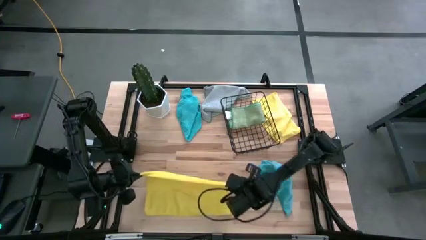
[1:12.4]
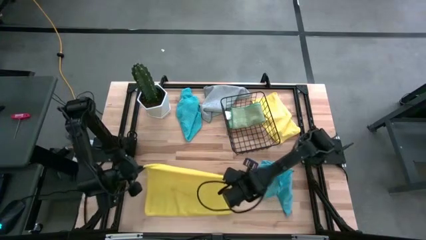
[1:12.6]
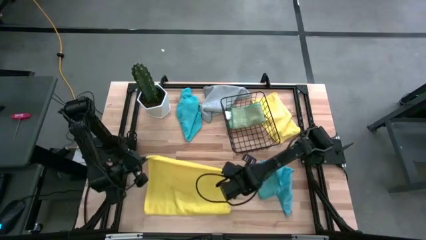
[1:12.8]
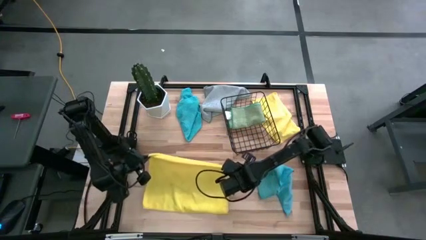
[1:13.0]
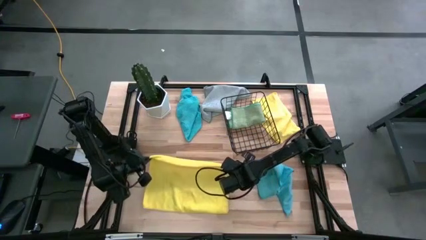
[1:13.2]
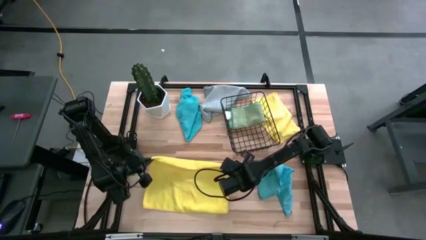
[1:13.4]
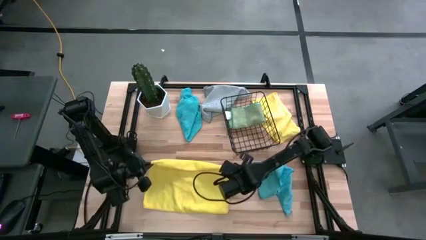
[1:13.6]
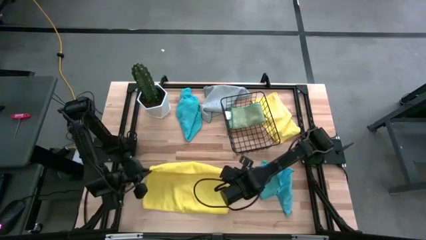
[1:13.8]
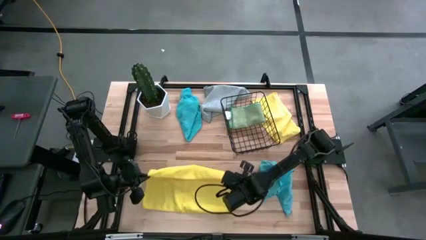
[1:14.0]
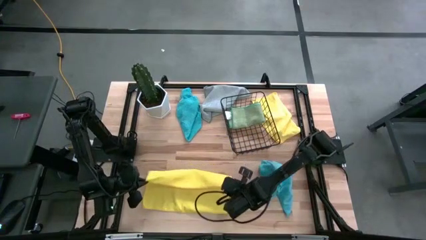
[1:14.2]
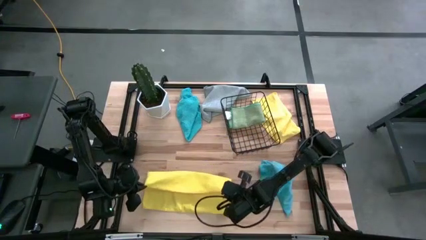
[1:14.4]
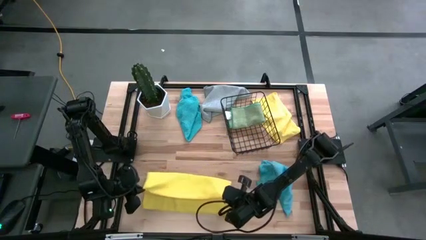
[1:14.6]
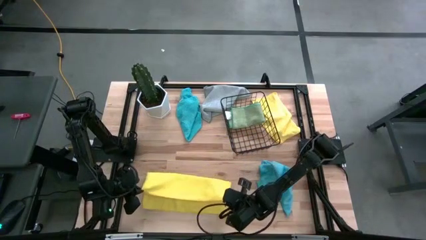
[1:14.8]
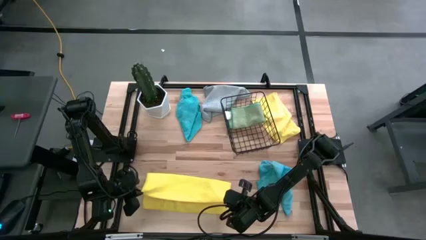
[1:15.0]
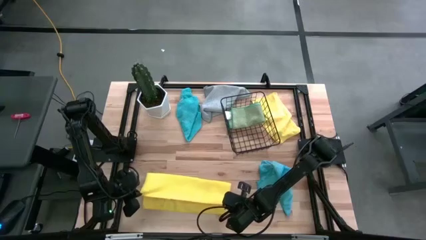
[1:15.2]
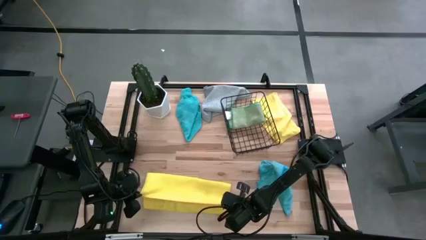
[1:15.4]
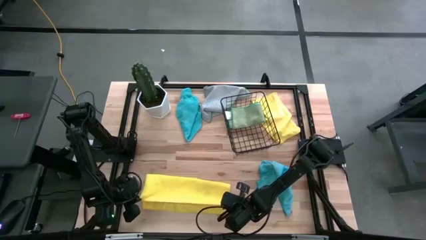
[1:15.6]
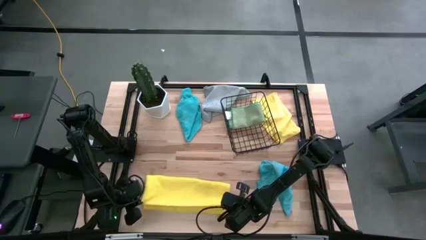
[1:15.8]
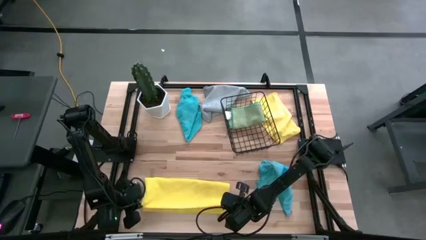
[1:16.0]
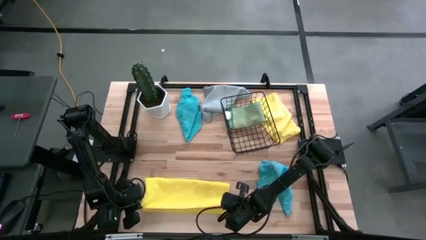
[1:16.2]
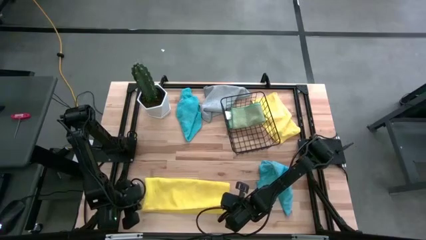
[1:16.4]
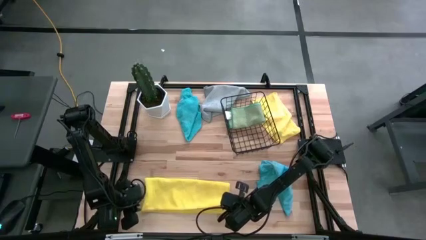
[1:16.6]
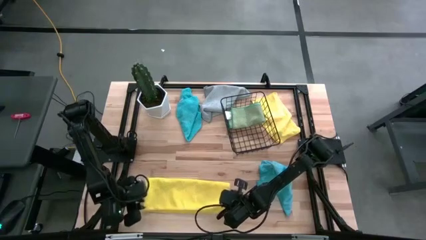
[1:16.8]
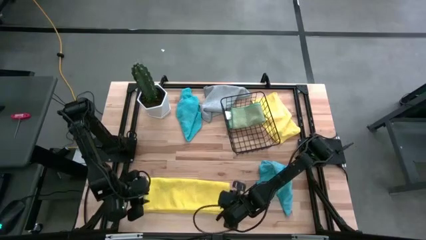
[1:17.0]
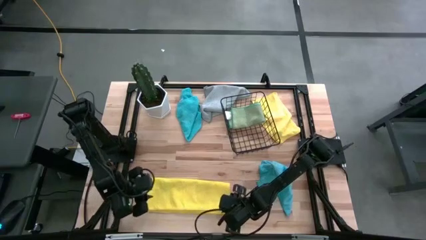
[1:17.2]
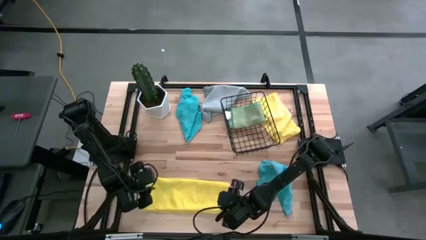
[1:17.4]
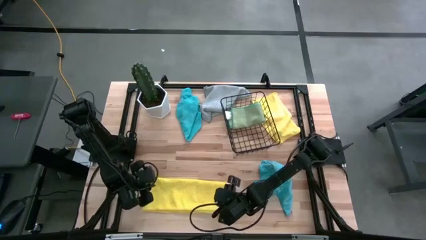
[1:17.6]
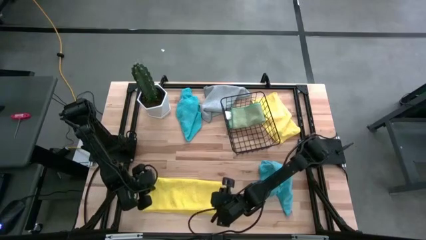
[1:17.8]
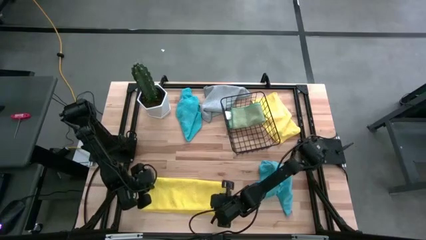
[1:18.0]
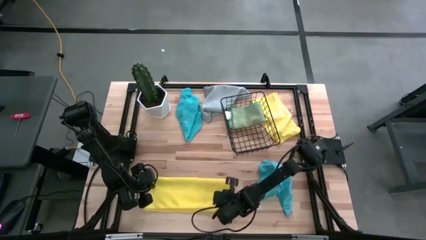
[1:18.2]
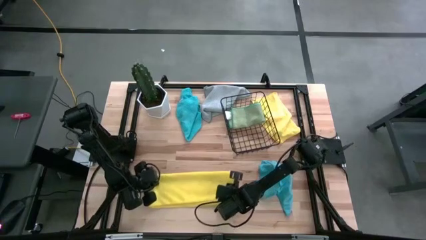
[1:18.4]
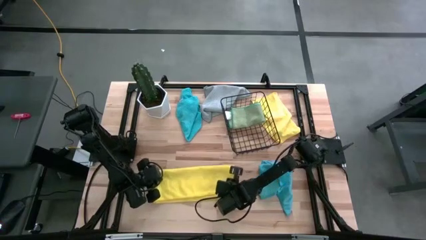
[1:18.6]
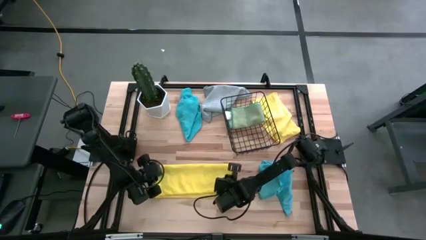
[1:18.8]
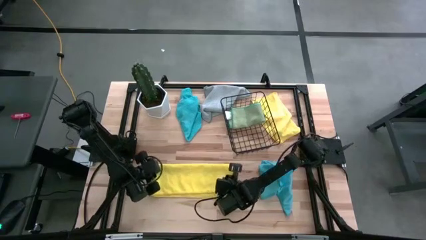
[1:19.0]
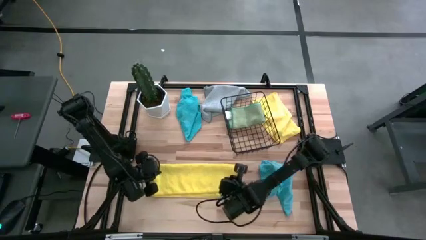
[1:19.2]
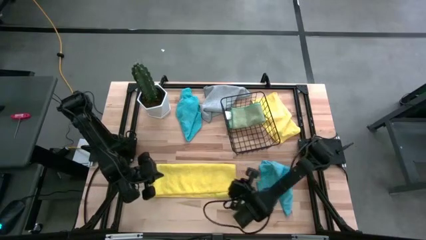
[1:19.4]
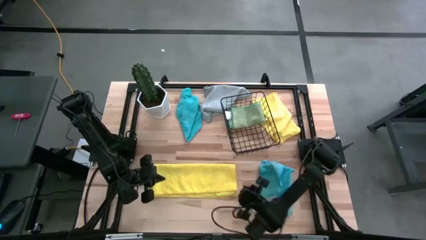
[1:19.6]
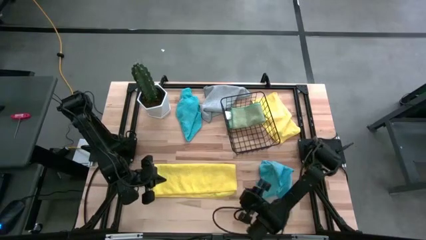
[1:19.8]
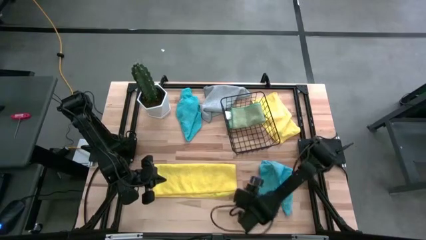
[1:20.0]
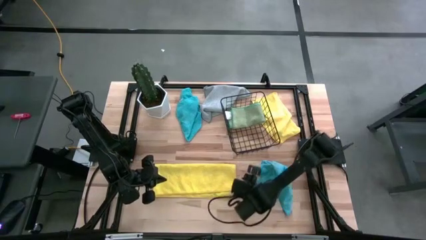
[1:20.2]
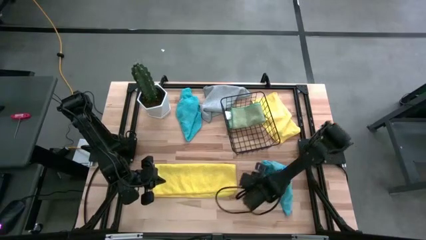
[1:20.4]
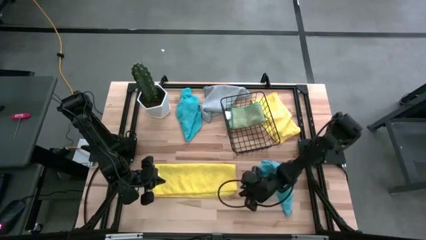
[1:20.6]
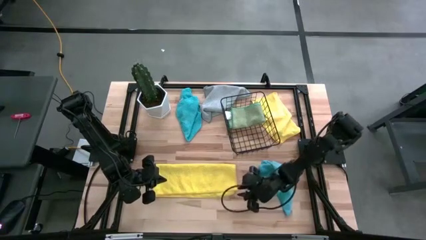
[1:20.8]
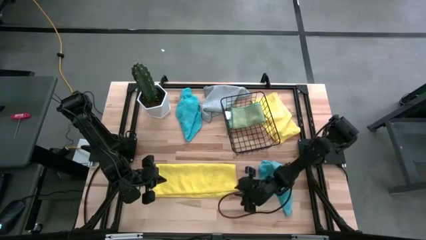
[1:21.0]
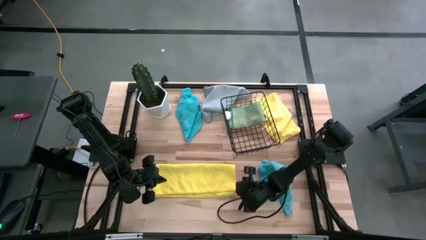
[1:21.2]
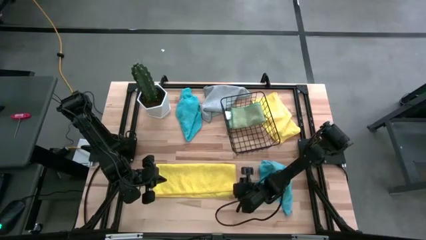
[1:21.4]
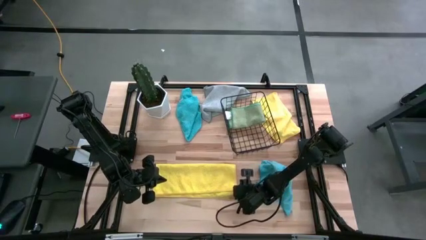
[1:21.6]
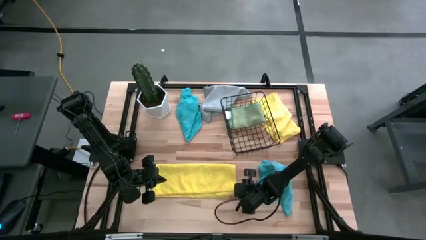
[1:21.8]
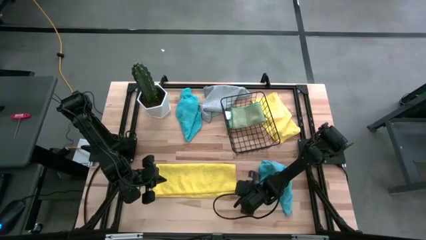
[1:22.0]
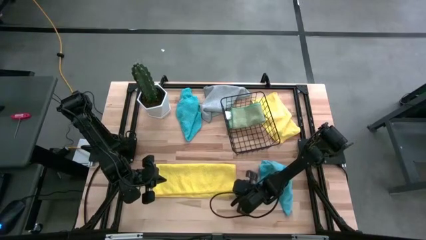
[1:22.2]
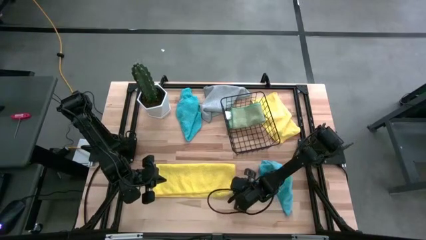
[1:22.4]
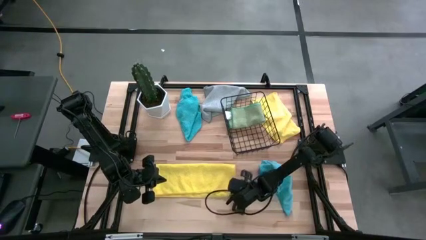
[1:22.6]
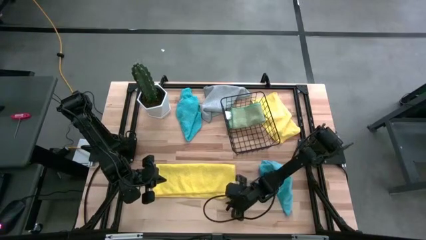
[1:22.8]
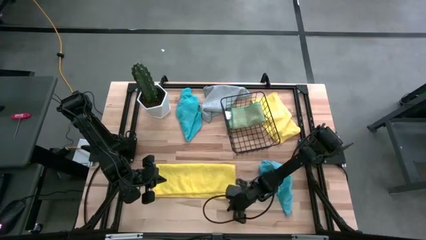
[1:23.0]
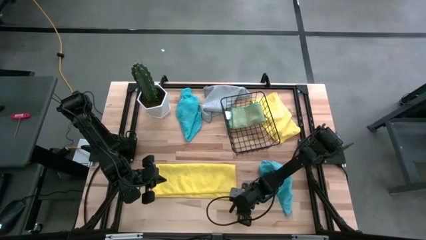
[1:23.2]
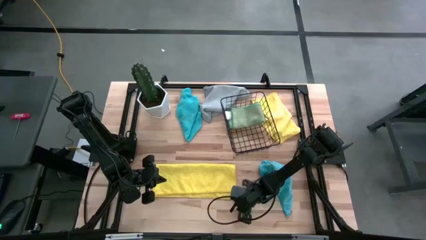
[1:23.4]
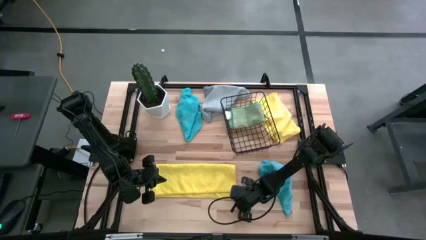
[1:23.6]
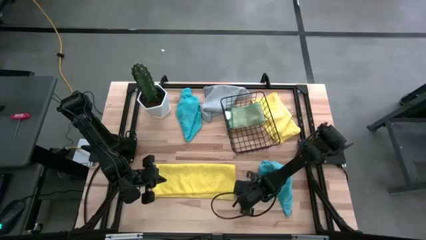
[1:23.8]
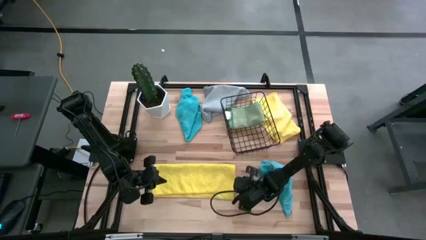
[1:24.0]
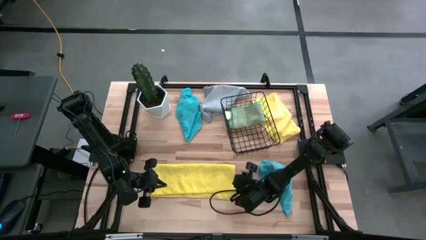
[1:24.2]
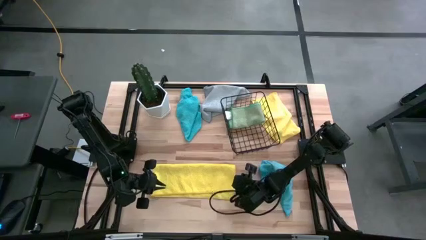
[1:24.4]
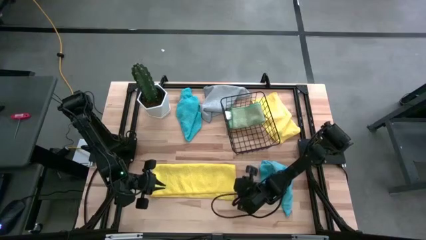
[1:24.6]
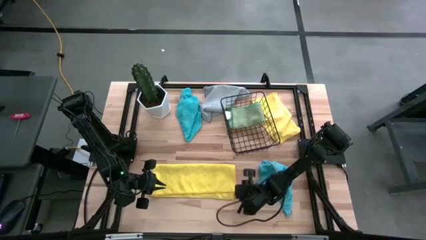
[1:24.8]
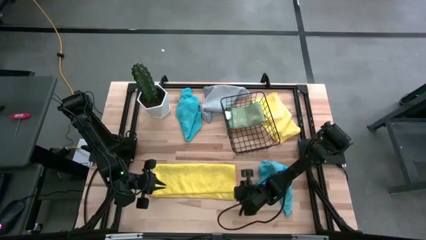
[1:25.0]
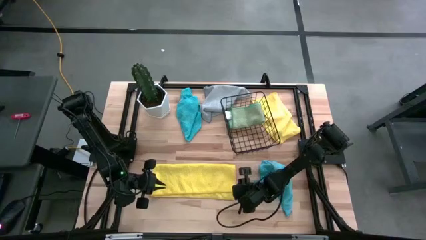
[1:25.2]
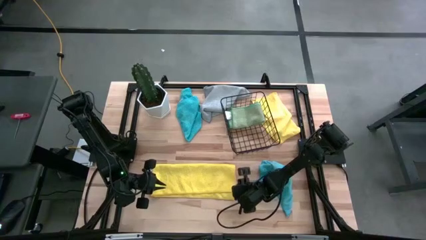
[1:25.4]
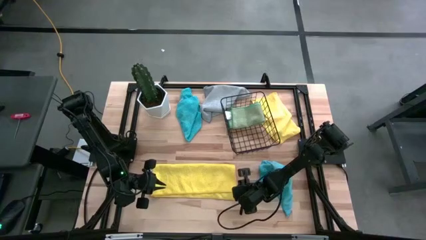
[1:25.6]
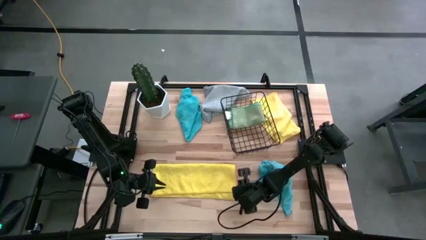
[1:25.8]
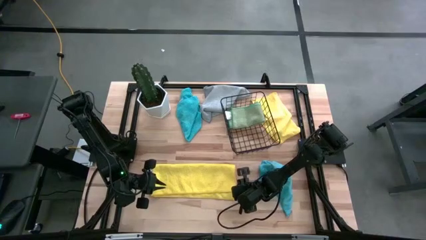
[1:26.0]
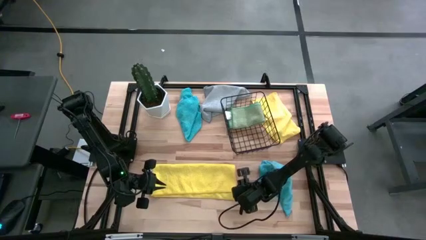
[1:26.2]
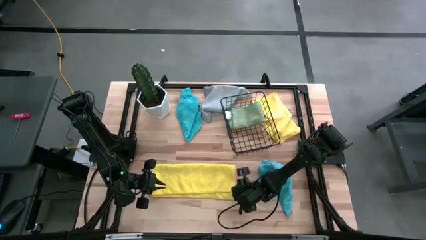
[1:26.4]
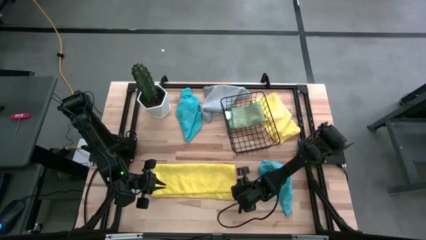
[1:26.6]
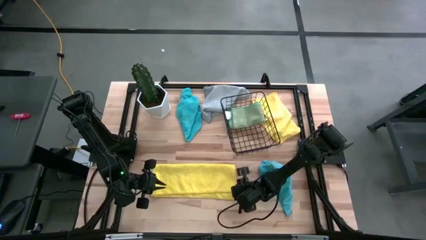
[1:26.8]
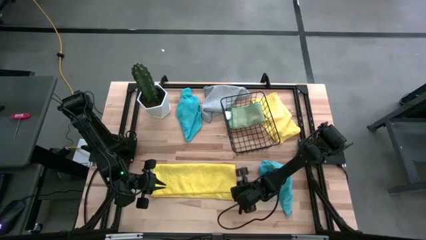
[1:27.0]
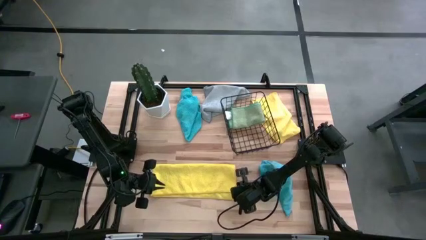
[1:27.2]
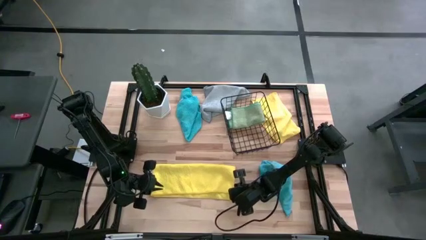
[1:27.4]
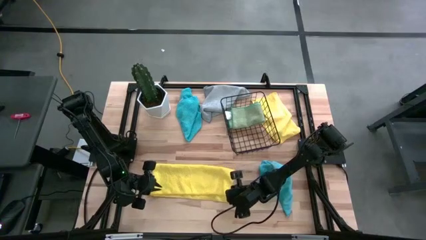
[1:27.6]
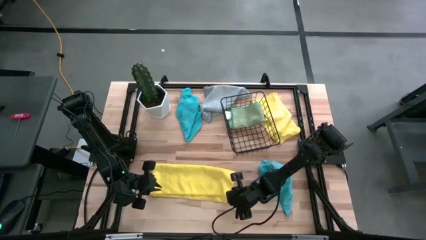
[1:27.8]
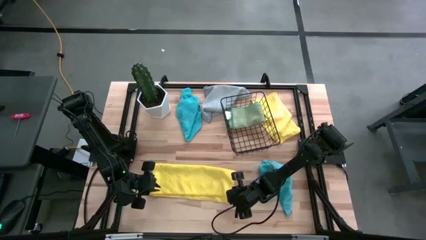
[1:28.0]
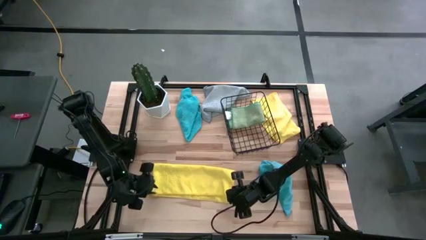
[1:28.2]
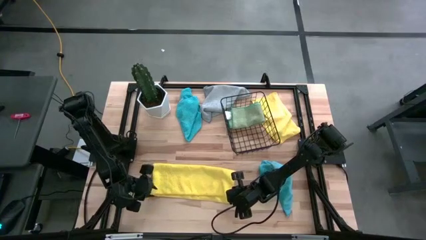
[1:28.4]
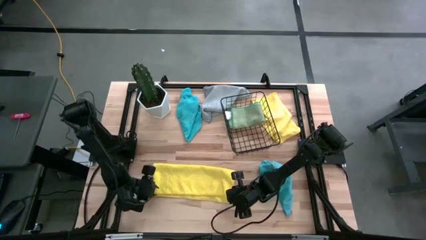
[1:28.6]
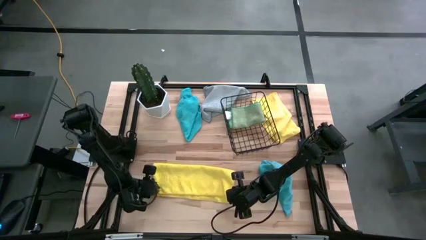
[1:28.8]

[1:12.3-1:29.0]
Task: Fold microfiber towels
Fold the bottom yellow microfiber towel
